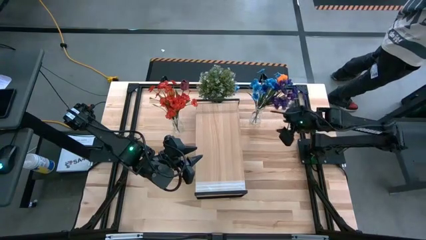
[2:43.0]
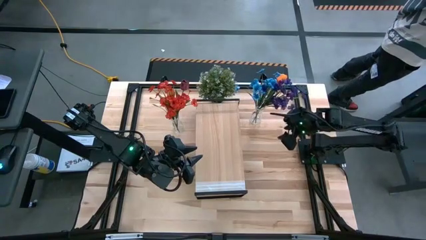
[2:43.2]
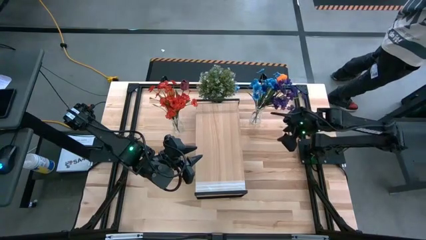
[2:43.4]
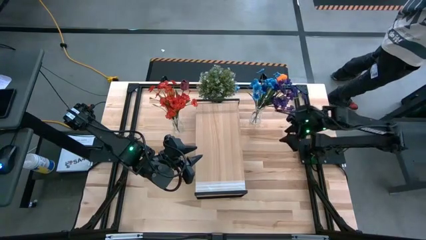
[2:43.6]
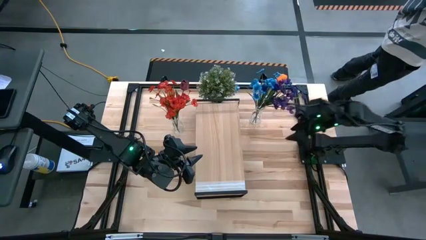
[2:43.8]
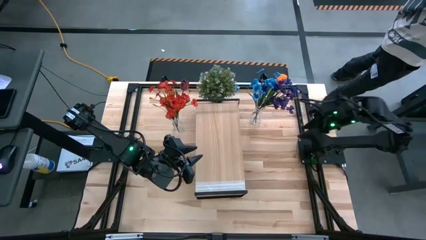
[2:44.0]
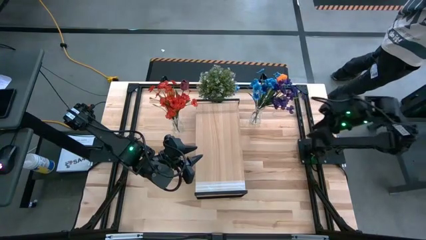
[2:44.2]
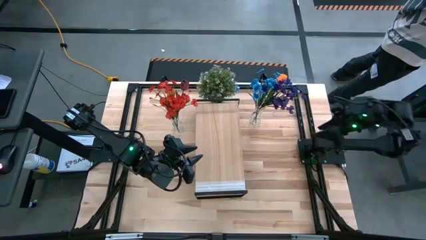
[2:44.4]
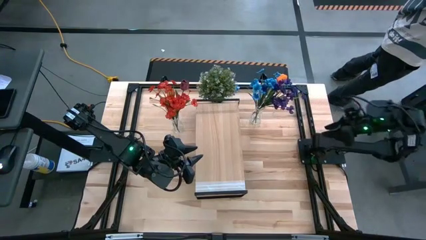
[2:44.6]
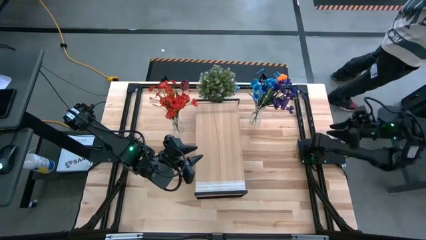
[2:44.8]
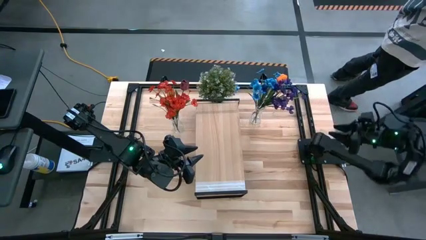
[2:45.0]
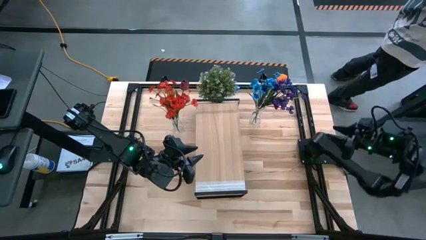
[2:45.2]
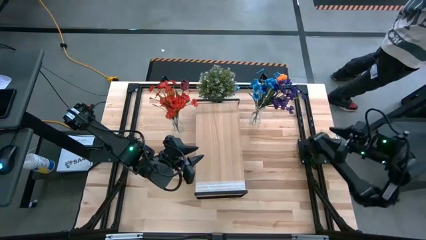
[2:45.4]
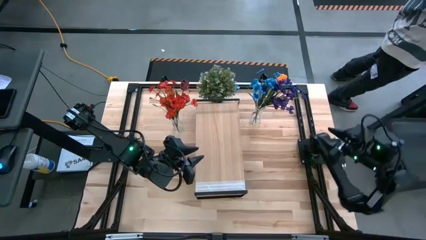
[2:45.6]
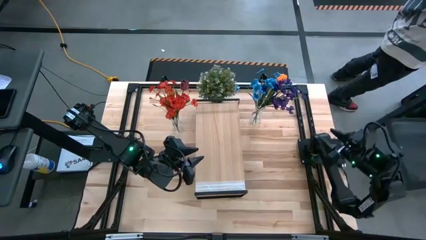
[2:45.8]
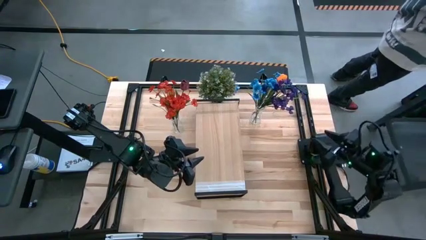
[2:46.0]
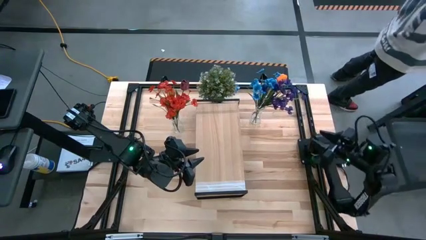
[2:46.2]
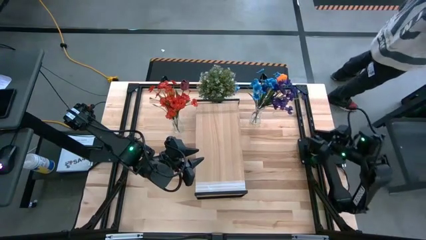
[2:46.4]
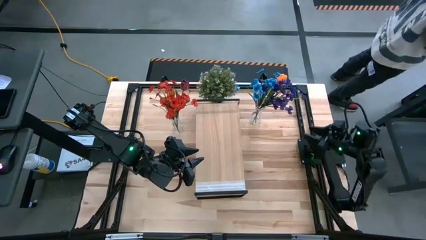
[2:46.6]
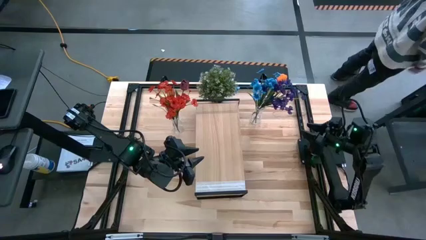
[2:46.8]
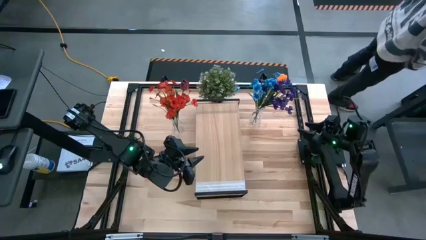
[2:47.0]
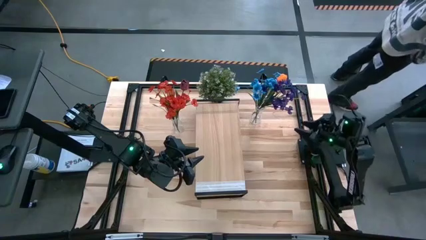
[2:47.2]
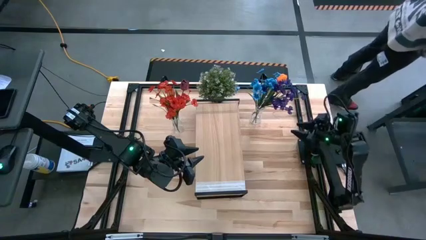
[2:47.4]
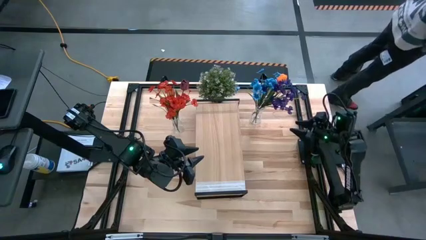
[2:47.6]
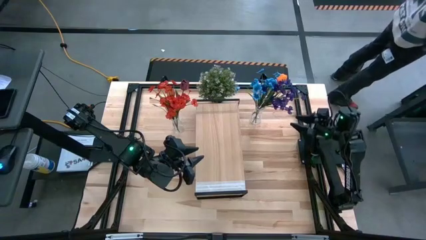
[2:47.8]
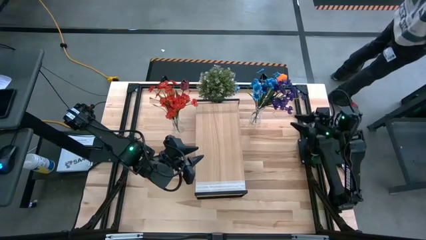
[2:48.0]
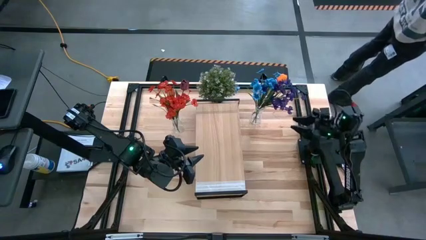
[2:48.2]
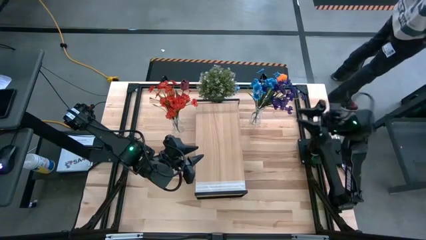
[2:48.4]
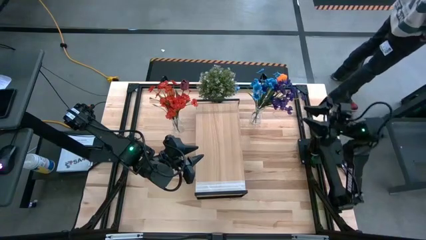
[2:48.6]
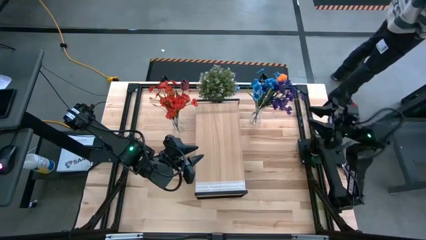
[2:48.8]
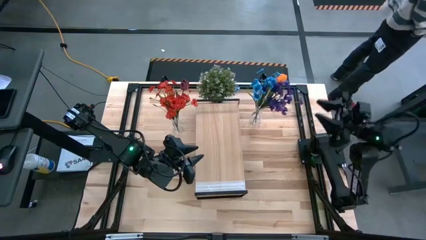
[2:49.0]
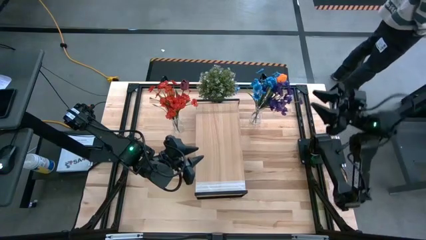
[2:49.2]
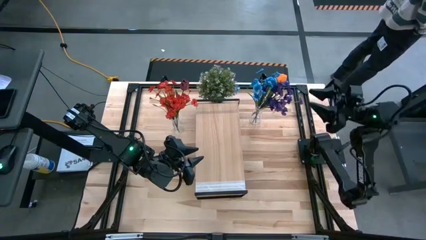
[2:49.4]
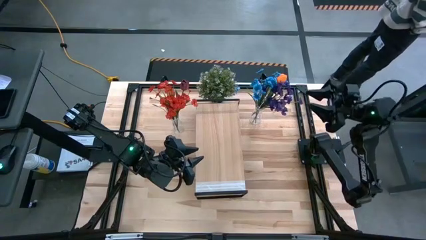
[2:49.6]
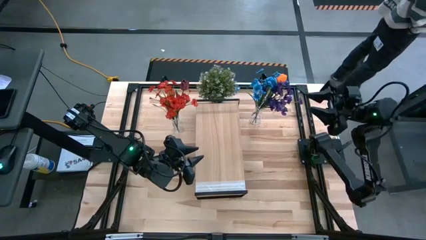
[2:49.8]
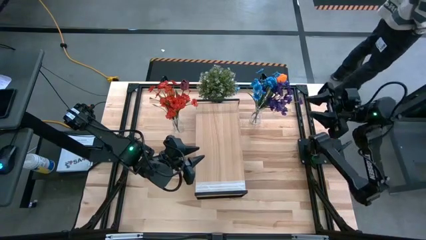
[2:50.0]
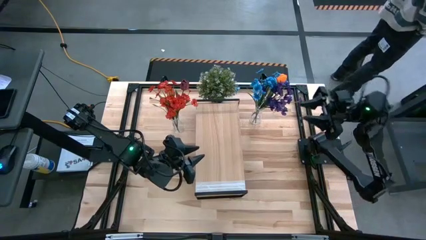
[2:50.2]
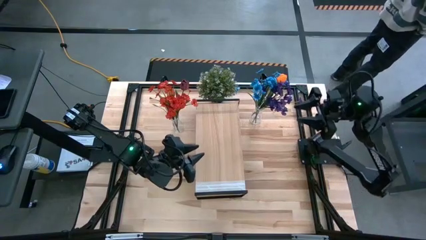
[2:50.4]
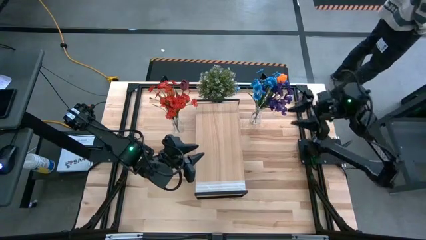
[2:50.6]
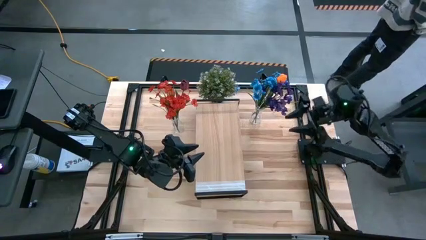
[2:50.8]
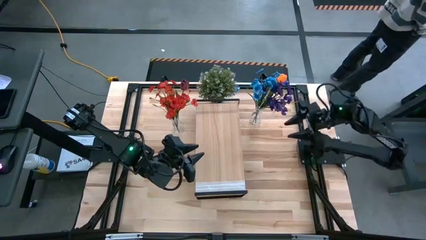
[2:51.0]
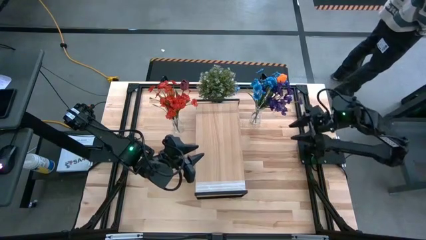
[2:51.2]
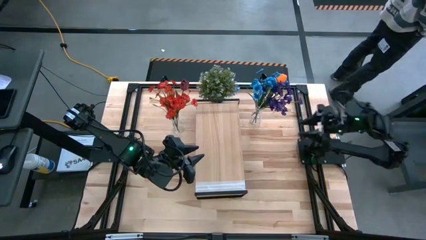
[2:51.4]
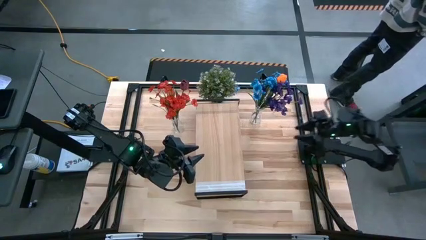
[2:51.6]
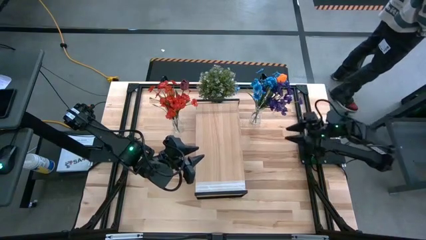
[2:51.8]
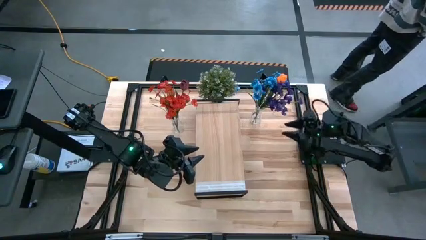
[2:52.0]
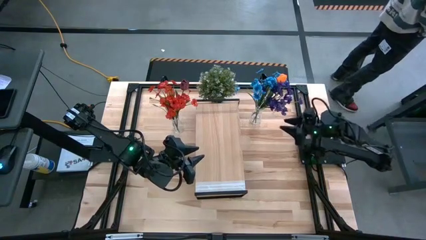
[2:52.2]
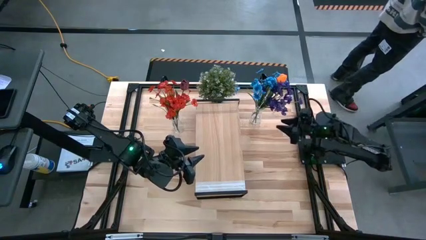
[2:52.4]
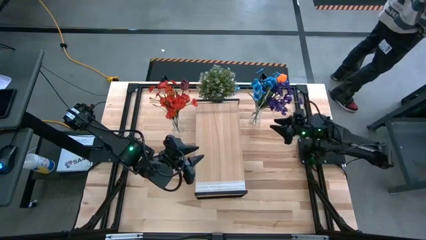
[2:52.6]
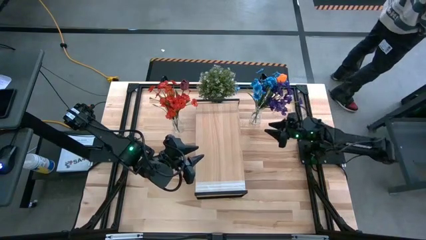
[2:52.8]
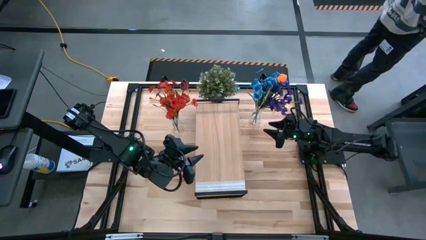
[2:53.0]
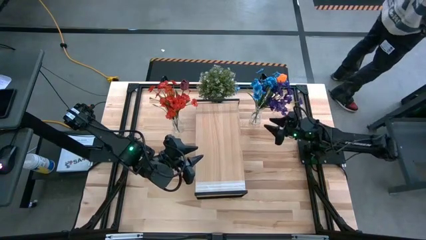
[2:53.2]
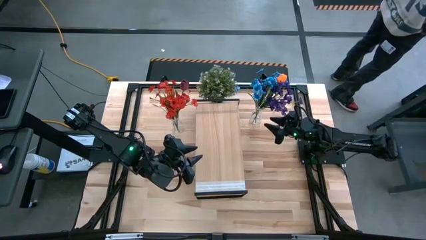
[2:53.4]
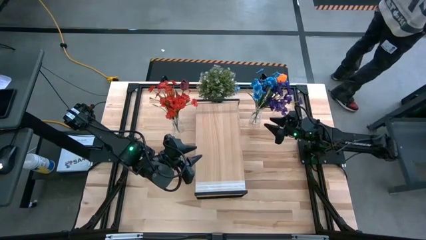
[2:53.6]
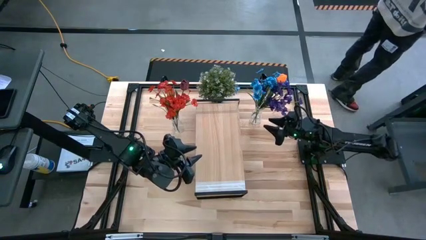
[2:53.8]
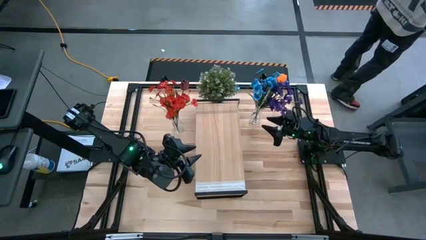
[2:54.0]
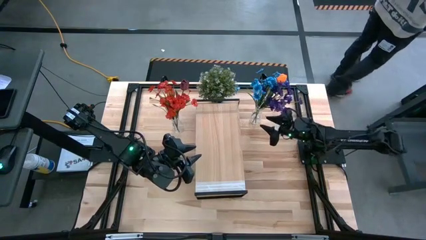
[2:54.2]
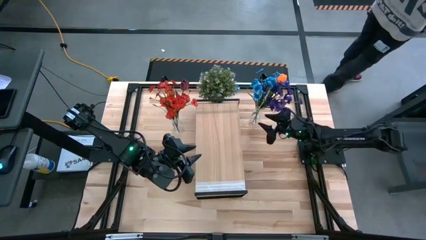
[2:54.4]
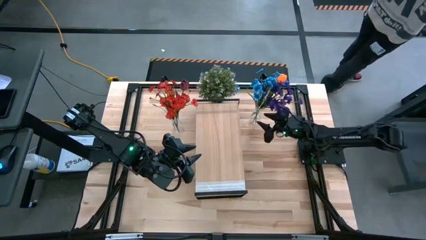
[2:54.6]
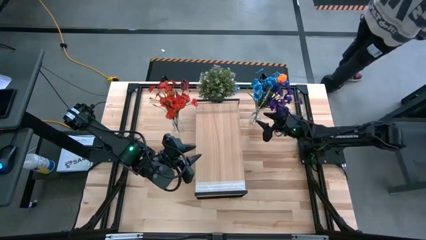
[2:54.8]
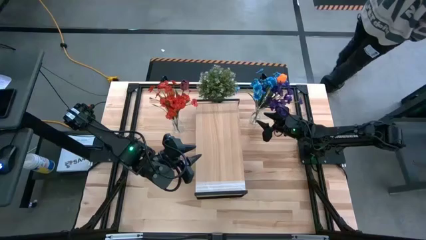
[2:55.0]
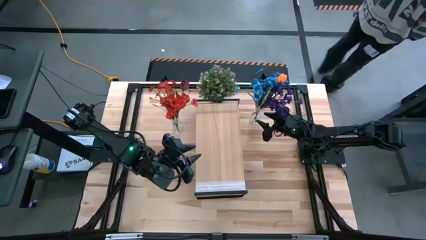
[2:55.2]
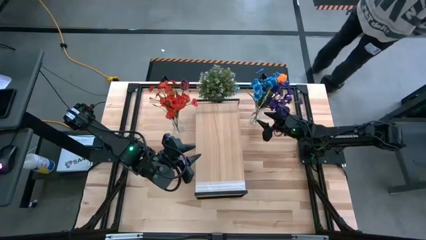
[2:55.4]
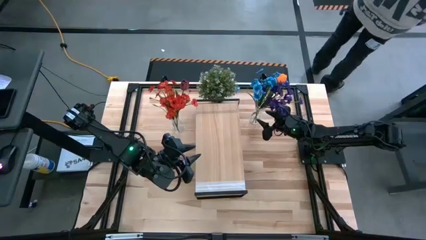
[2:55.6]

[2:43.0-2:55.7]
Task: Pick and place flowers into a vace then onto a shelf
Put the right transparent vase on the shelf

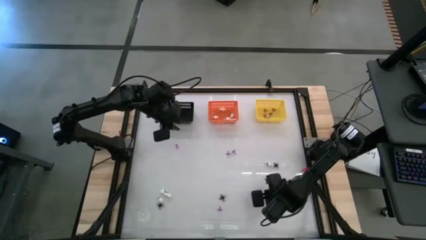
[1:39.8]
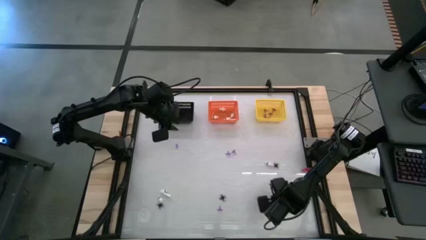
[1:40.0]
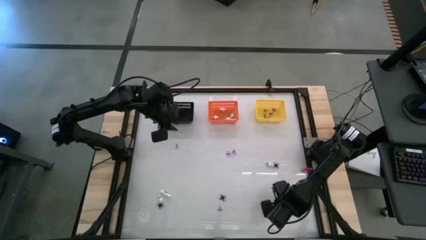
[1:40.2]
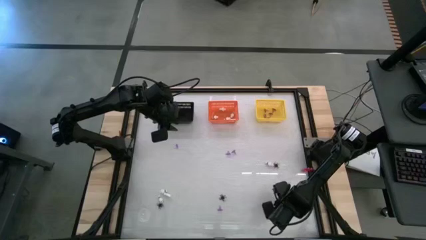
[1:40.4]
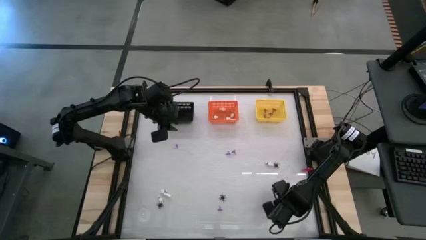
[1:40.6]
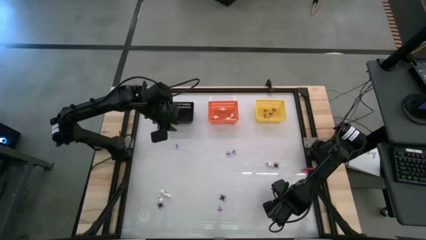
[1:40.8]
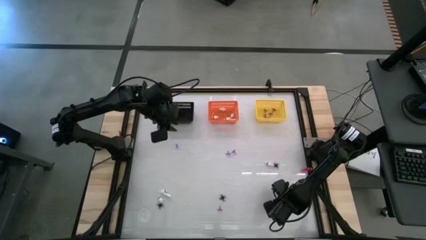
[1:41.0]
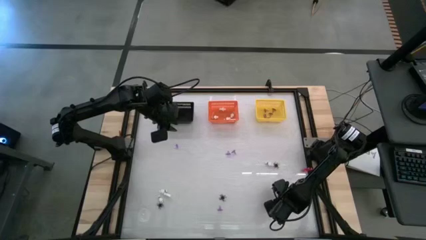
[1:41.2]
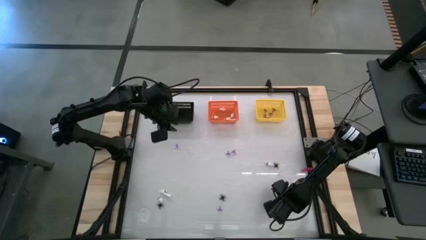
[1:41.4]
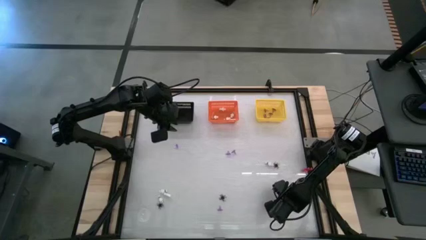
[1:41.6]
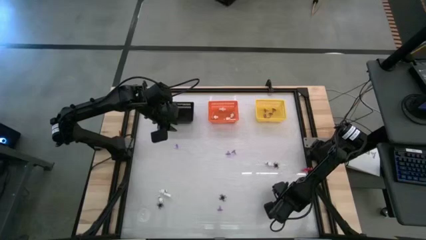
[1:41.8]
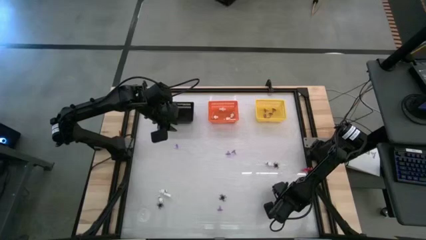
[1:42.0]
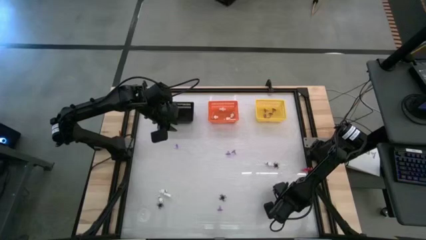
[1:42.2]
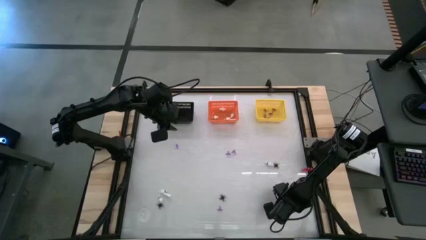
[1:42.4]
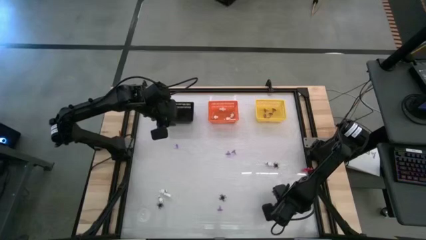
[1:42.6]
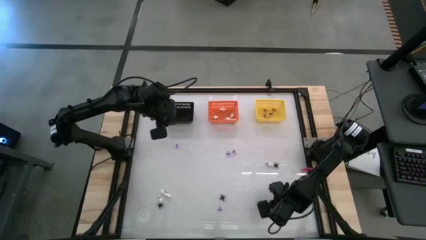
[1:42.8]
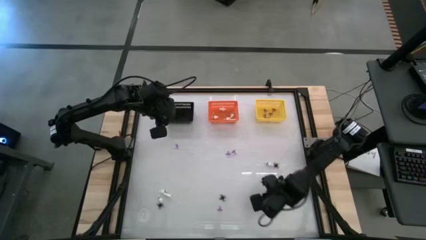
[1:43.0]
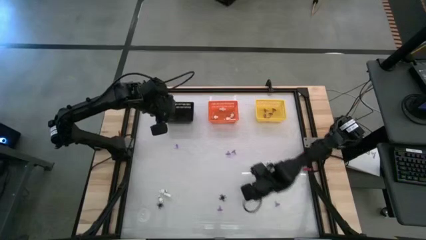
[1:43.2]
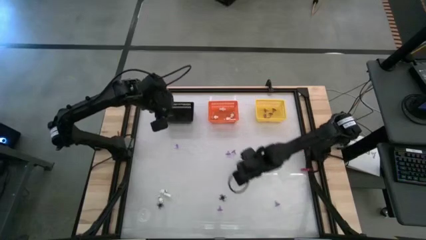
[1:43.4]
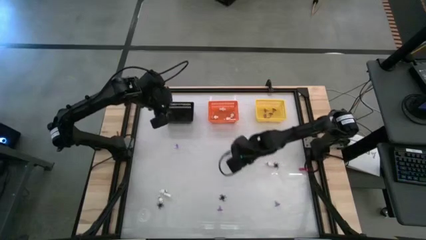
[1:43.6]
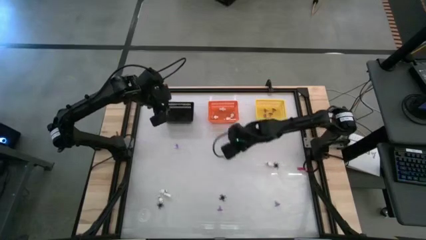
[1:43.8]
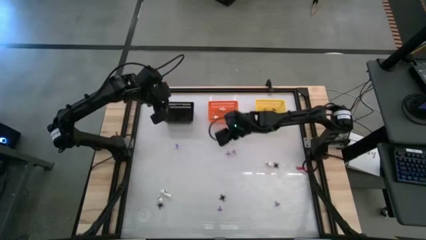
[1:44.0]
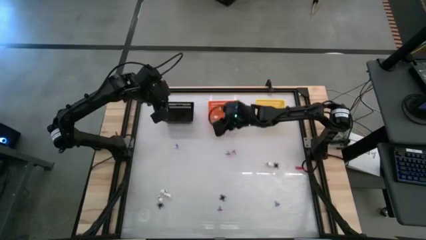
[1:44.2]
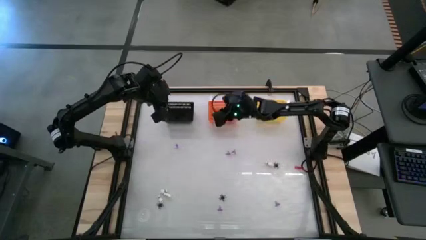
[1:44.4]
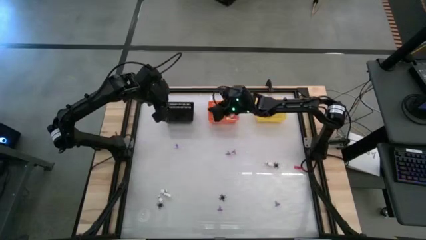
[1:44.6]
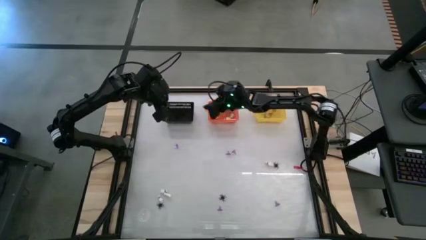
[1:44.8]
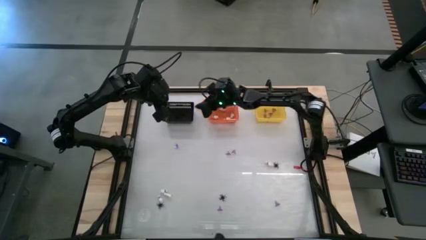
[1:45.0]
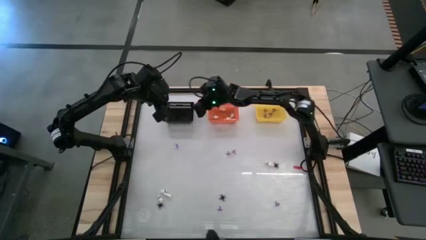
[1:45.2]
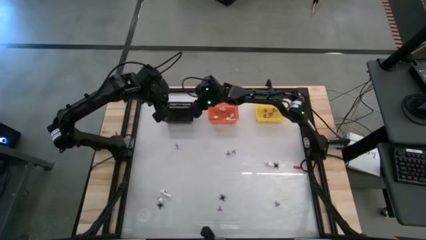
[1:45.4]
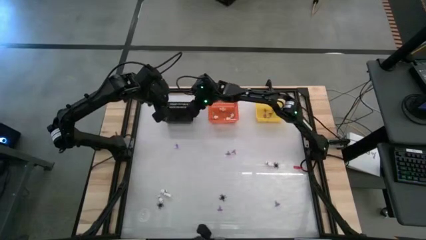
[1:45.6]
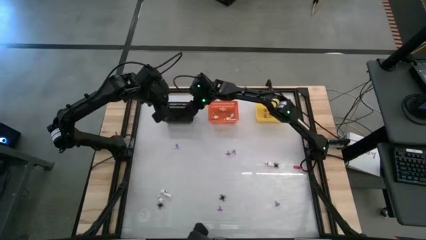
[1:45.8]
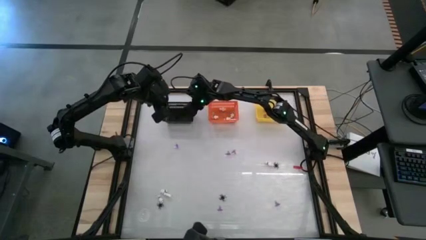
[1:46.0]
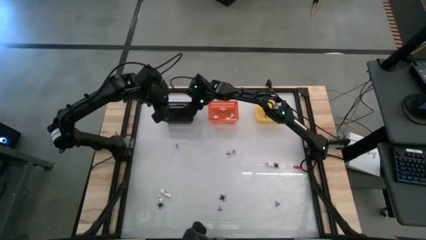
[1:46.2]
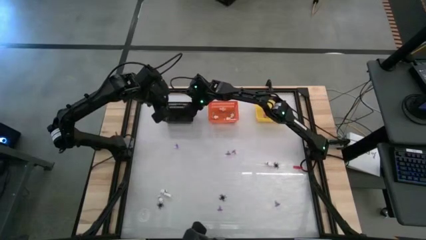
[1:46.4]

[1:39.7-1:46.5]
Task: Sort Halloween decoration
Put the spider toy into the black bin
